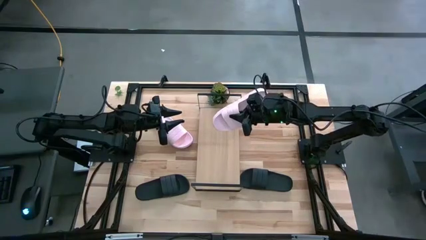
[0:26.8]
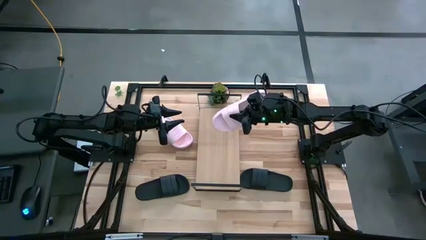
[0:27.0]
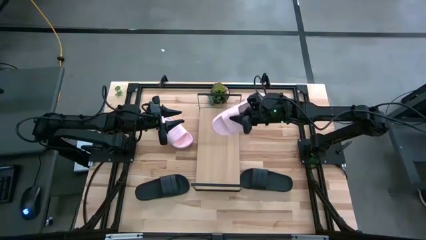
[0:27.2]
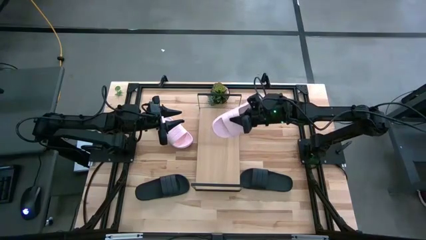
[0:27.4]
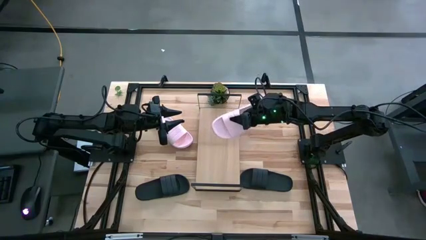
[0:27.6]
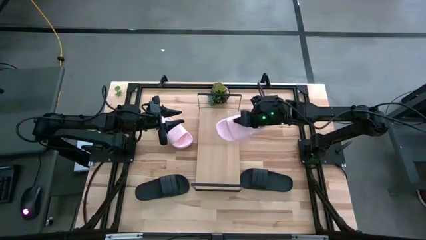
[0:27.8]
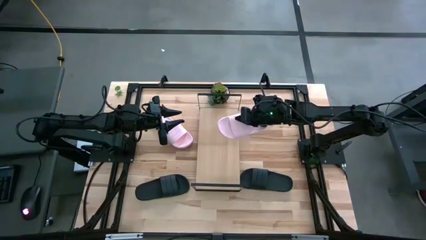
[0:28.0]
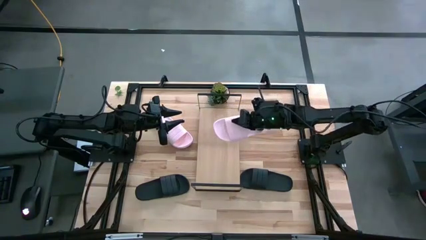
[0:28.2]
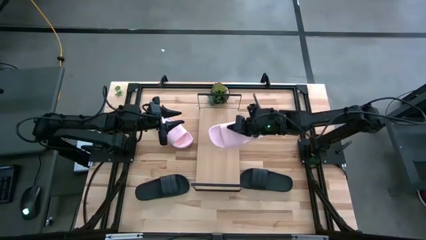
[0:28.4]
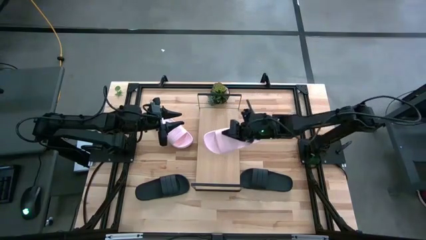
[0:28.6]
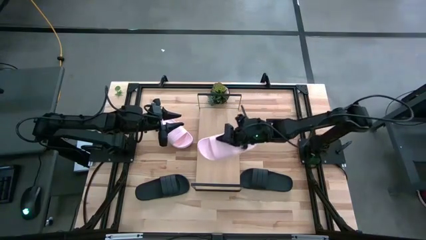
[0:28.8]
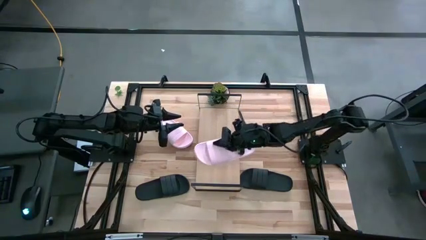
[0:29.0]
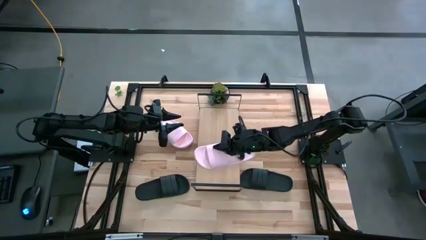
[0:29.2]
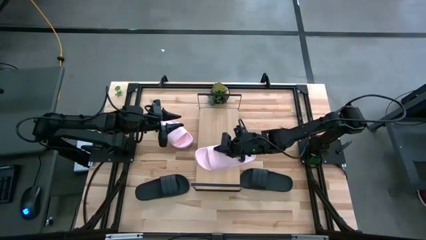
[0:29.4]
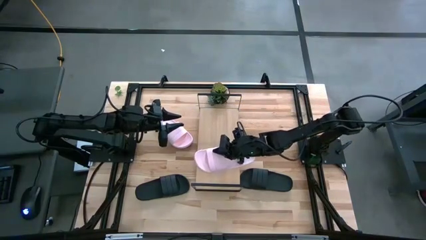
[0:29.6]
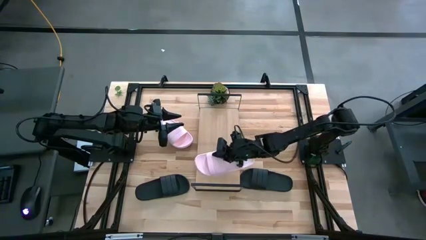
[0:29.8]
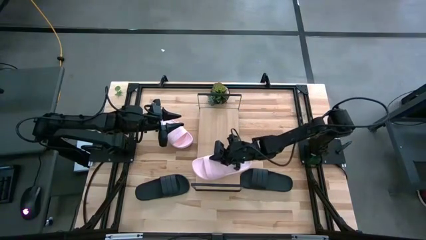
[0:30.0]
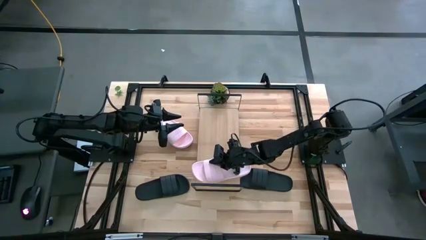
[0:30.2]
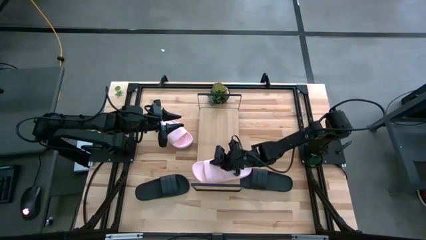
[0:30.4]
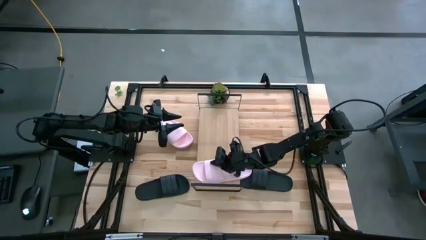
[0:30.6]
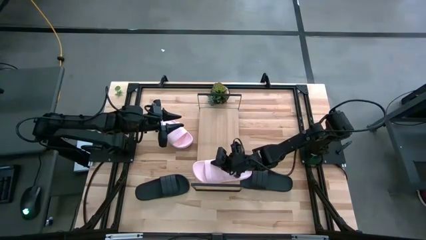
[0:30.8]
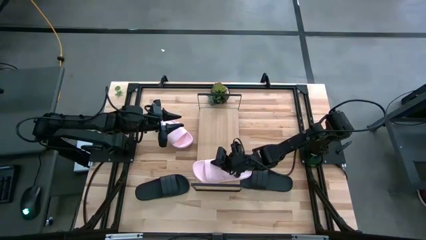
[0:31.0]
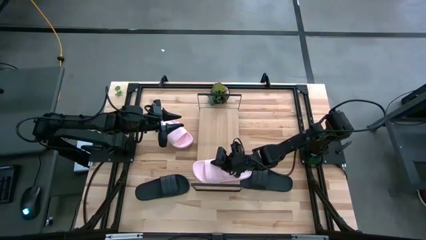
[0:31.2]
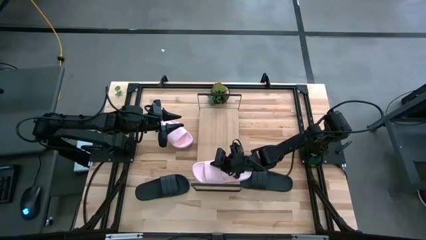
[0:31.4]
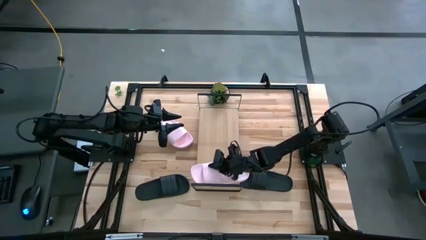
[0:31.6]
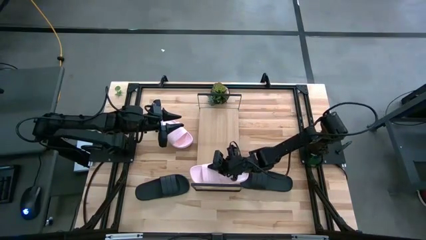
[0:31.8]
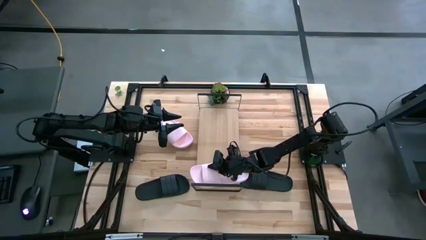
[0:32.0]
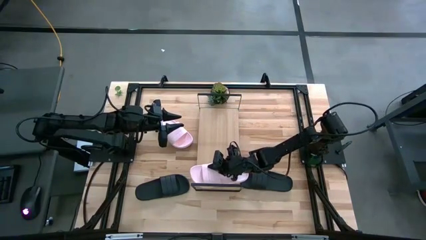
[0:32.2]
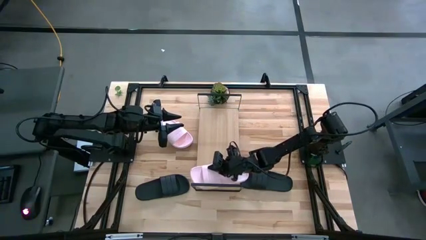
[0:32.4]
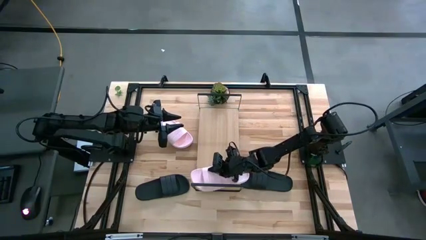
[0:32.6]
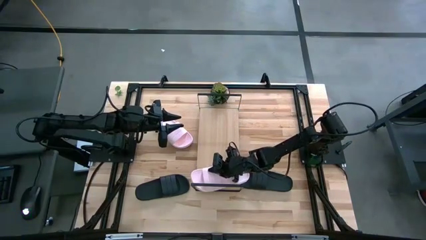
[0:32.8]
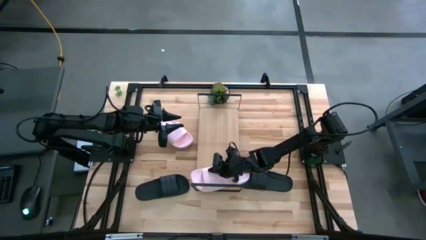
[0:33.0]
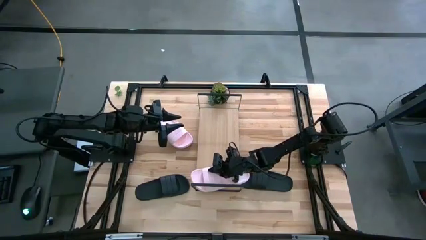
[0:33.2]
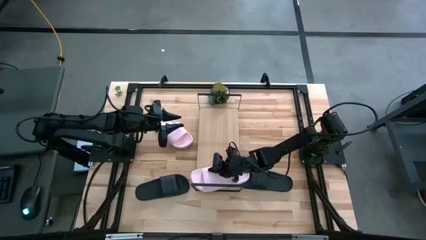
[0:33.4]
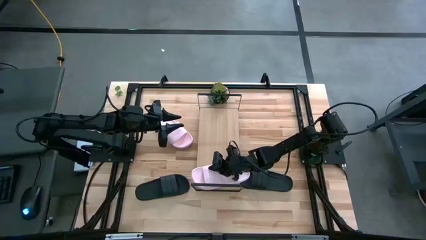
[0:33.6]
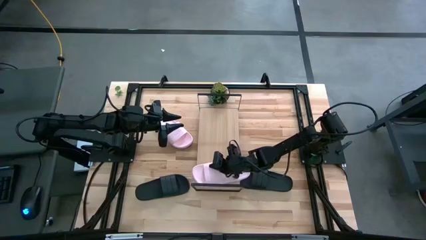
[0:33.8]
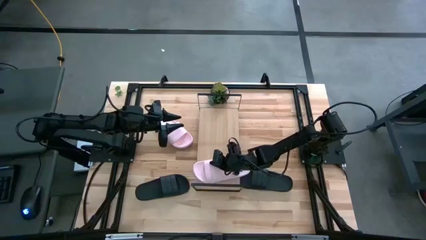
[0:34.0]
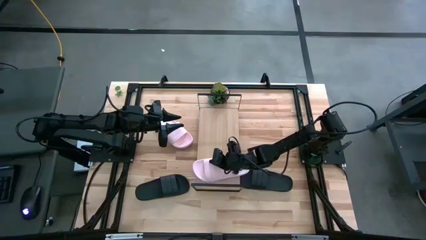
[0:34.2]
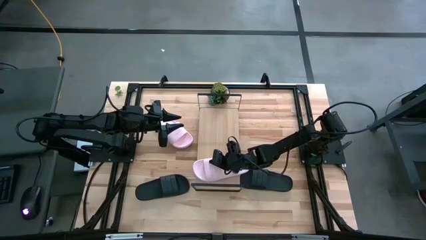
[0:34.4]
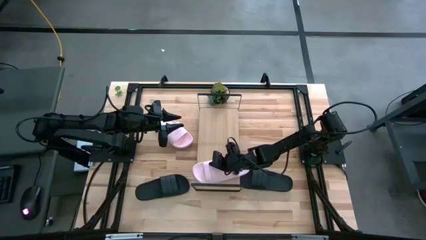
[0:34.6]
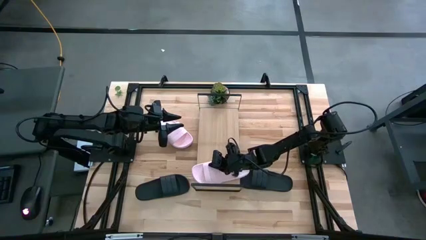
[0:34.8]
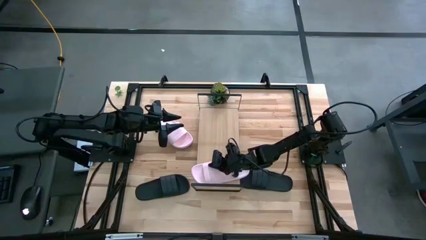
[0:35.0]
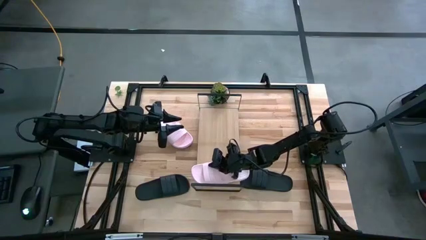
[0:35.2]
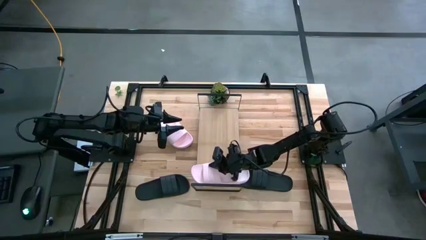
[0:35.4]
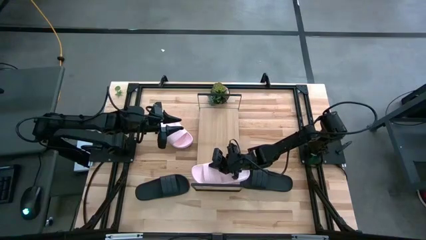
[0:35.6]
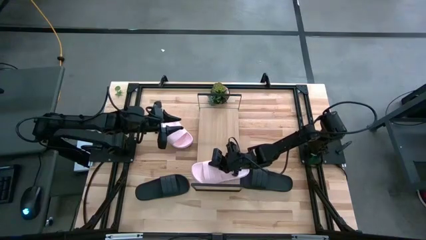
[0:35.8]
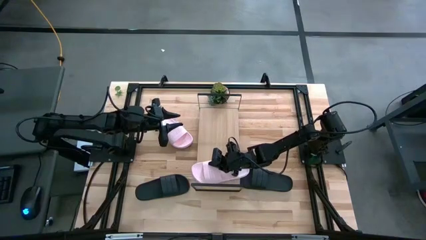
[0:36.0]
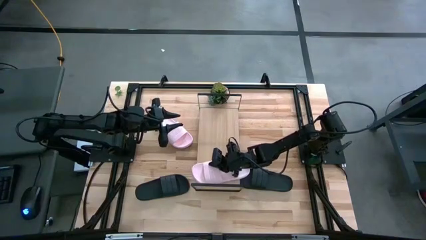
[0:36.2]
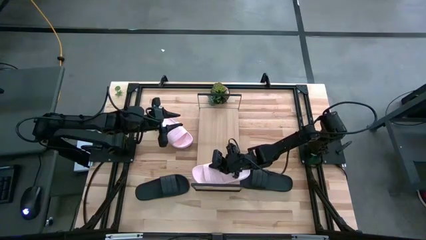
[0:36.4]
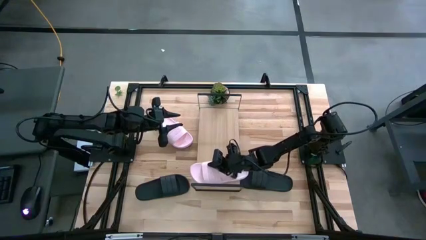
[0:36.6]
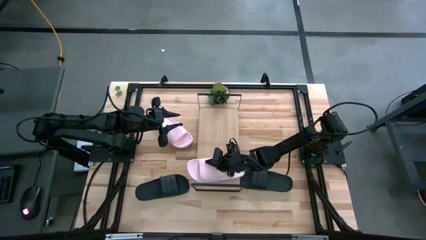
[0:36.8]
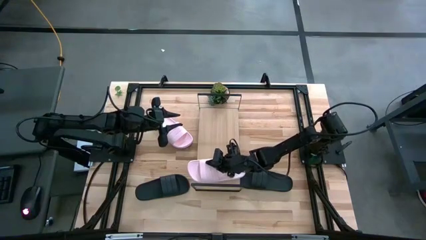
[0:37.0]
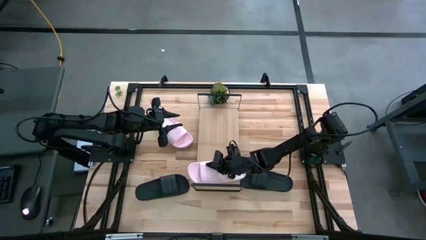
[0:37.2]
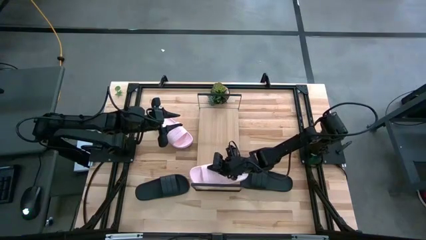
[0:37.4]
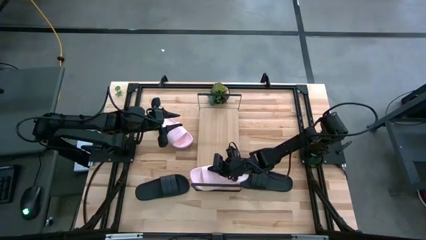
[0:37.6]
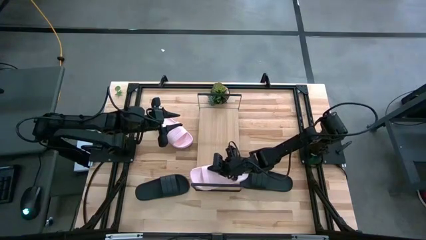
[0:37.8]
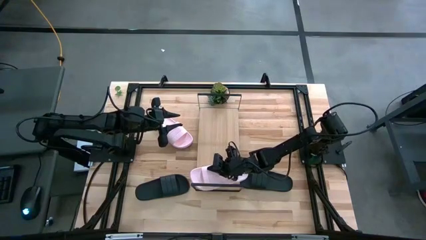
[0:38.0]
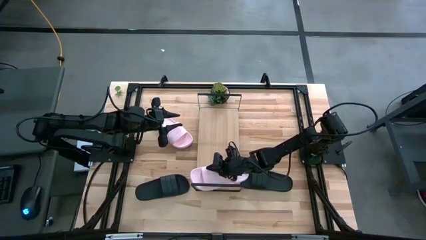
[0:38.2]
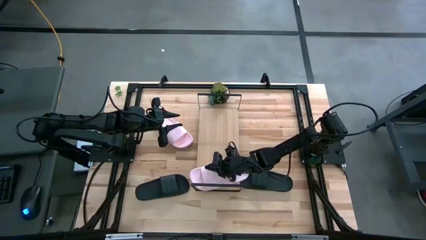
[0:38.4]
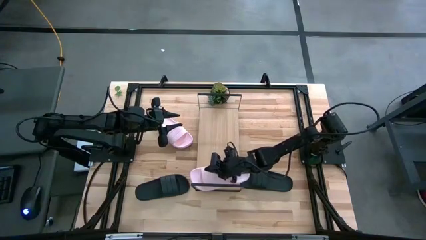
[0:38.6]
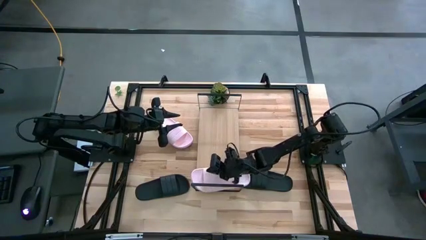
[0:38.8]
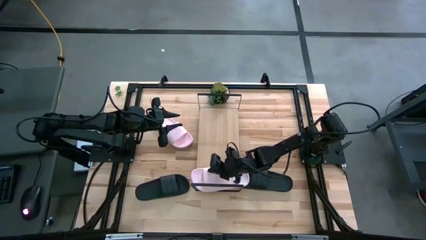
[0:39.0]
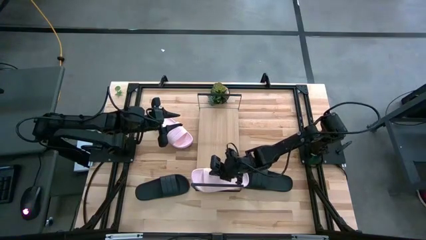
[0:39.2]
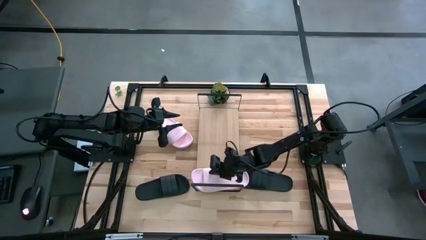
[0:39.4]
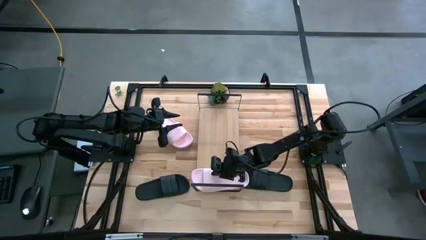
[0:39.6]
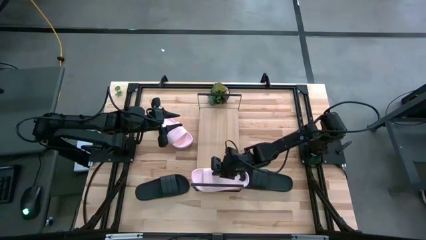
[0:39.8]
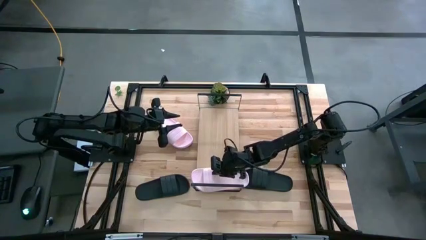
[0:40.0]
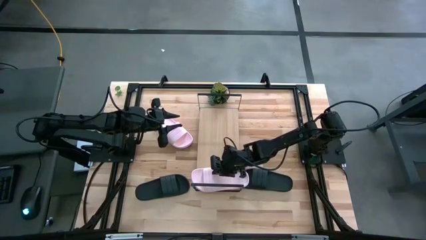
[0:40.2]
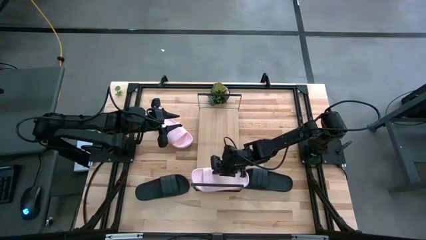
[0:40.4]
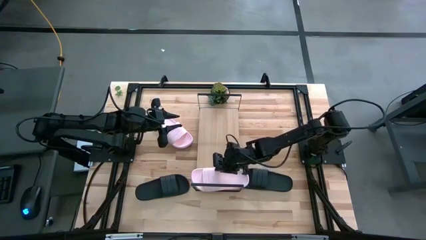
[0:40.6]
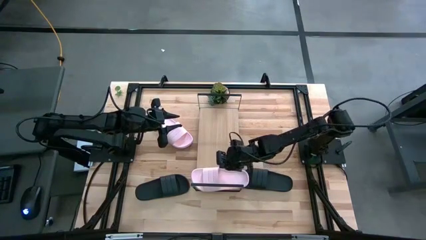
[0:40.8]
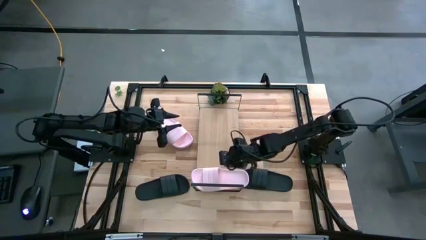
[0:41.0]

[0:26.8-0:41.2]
Task: Pick and place slides into the shelf
Put the right pink slide on the shelf
